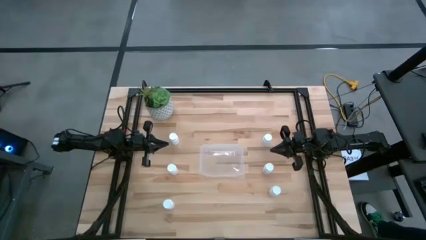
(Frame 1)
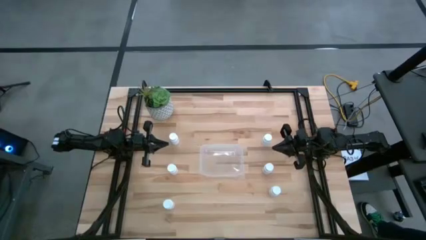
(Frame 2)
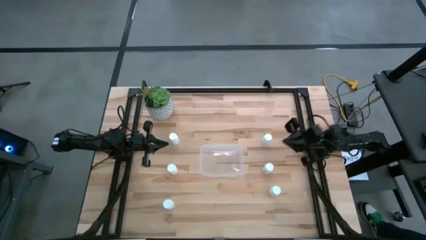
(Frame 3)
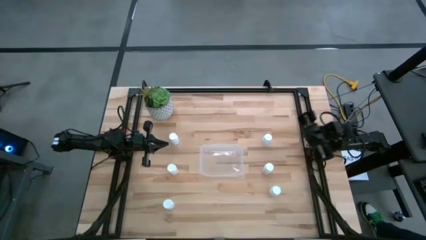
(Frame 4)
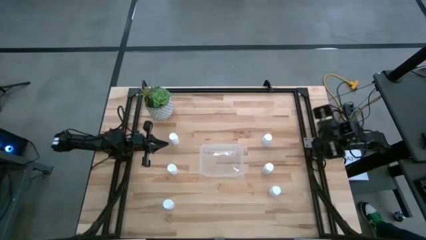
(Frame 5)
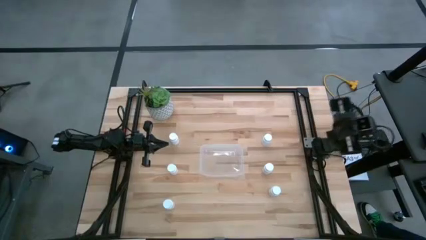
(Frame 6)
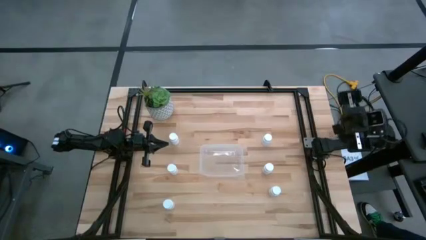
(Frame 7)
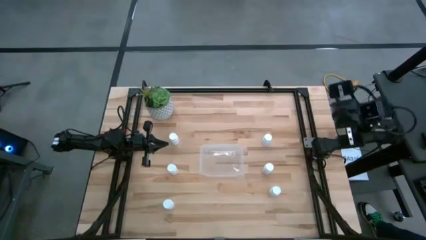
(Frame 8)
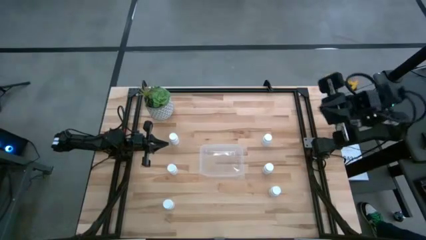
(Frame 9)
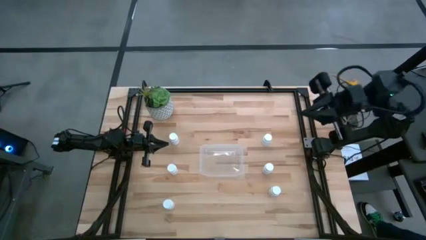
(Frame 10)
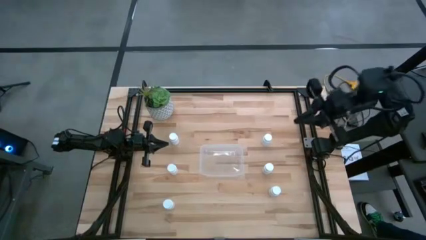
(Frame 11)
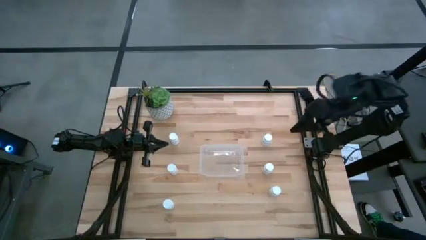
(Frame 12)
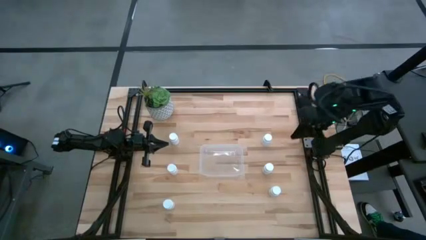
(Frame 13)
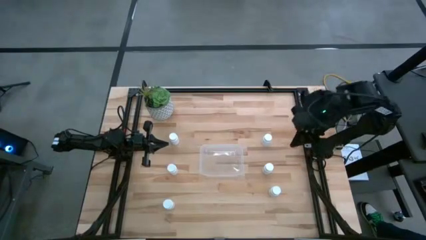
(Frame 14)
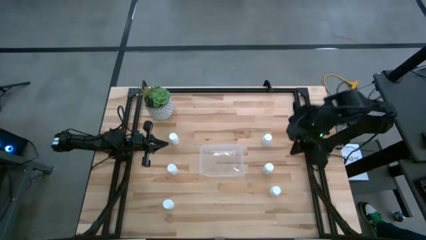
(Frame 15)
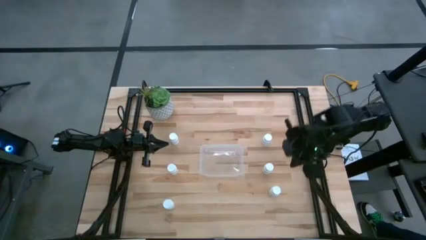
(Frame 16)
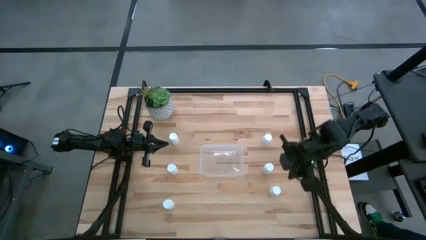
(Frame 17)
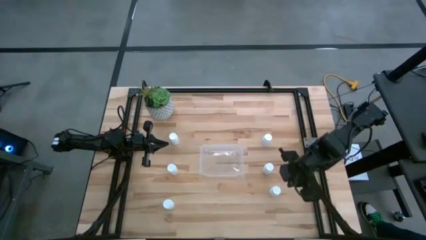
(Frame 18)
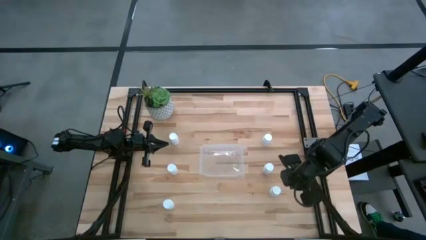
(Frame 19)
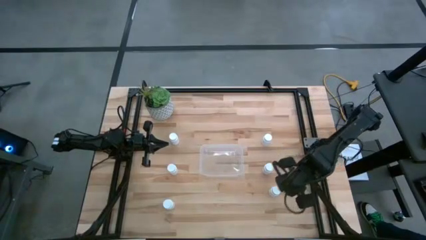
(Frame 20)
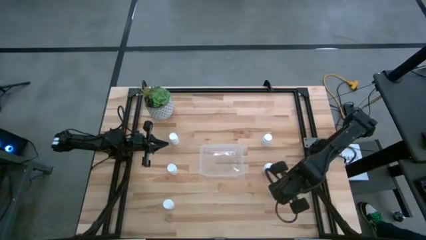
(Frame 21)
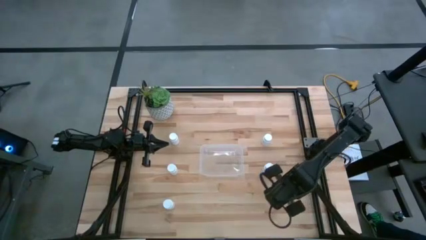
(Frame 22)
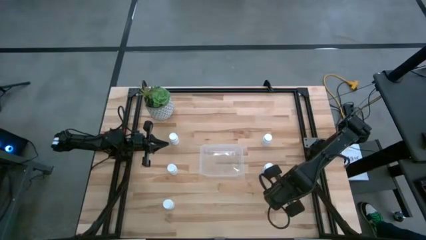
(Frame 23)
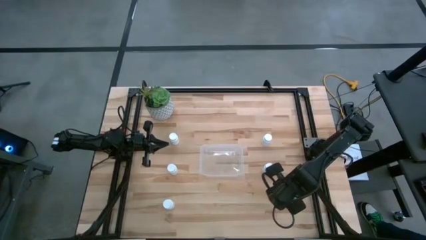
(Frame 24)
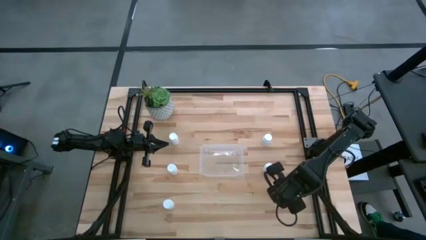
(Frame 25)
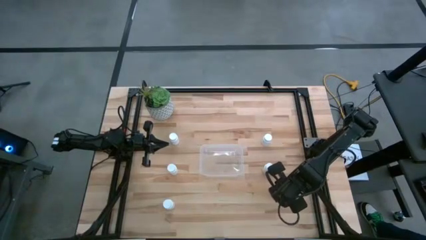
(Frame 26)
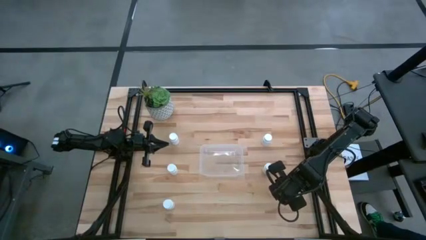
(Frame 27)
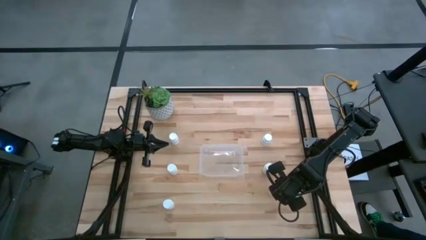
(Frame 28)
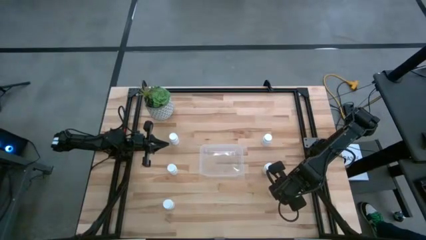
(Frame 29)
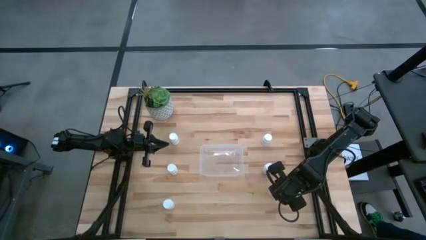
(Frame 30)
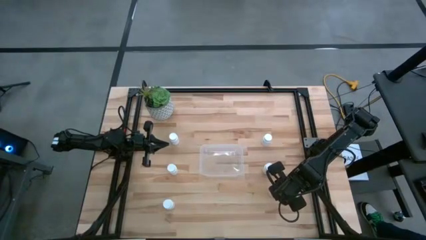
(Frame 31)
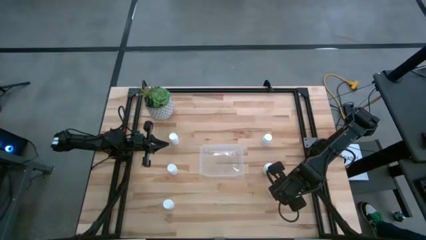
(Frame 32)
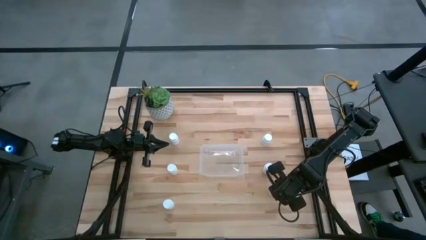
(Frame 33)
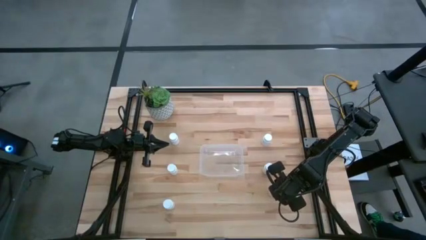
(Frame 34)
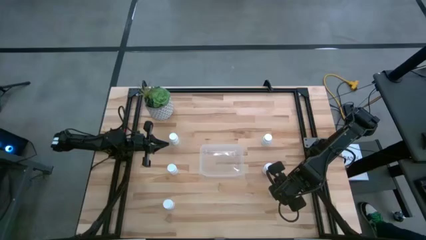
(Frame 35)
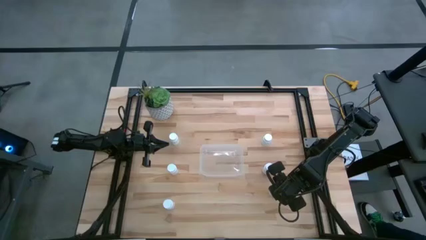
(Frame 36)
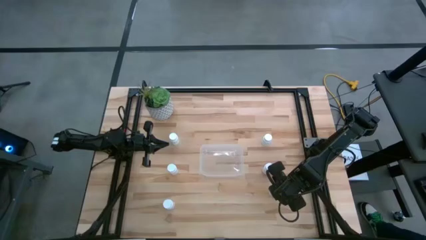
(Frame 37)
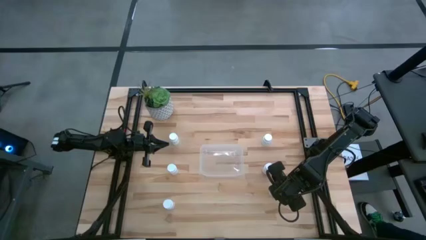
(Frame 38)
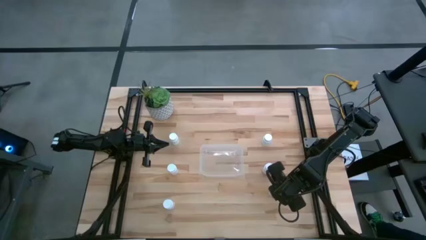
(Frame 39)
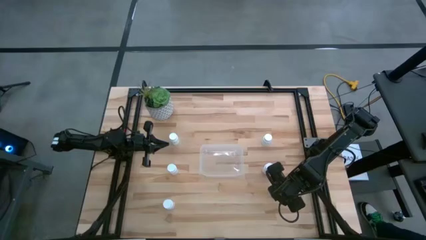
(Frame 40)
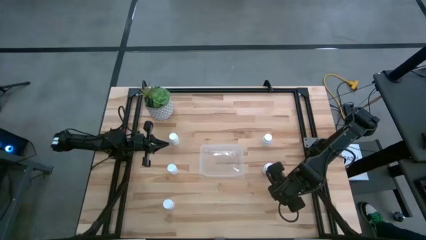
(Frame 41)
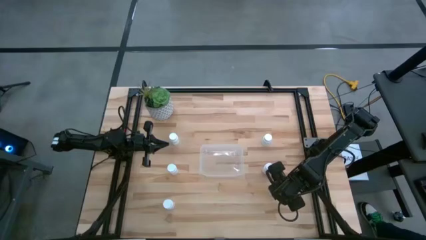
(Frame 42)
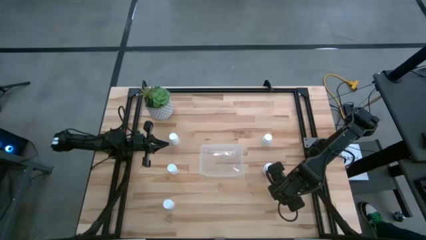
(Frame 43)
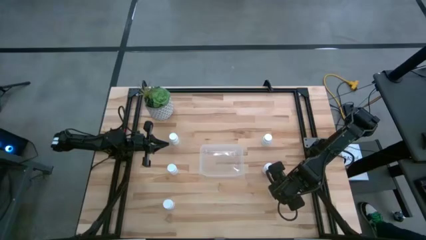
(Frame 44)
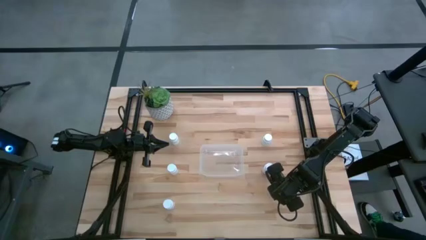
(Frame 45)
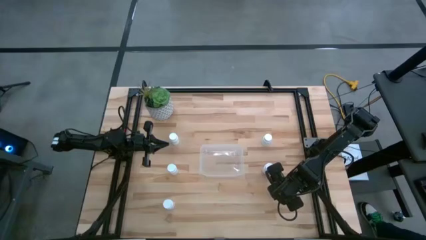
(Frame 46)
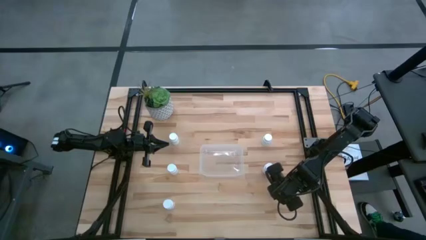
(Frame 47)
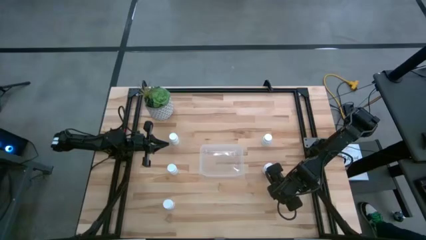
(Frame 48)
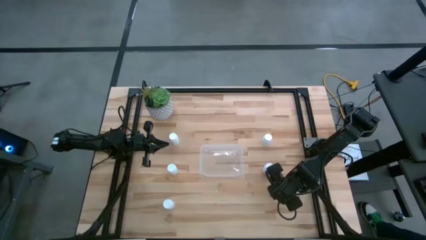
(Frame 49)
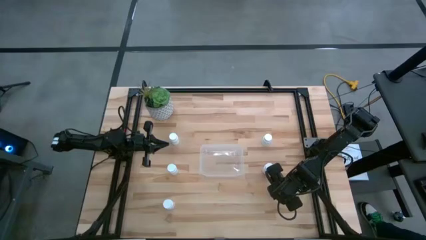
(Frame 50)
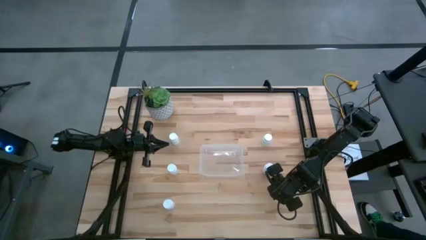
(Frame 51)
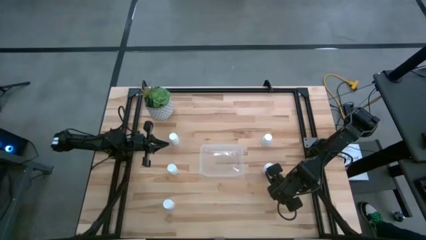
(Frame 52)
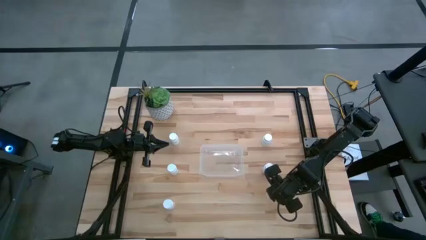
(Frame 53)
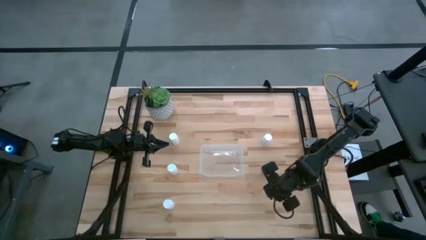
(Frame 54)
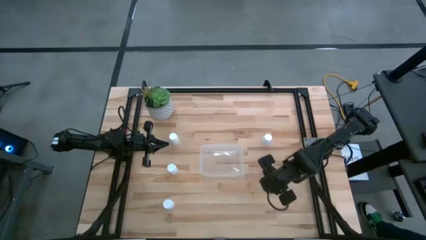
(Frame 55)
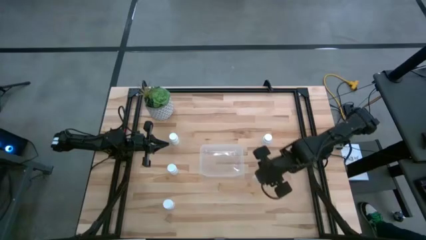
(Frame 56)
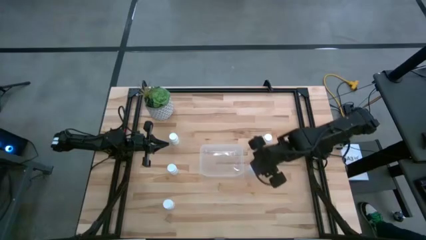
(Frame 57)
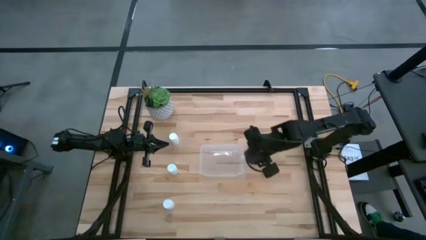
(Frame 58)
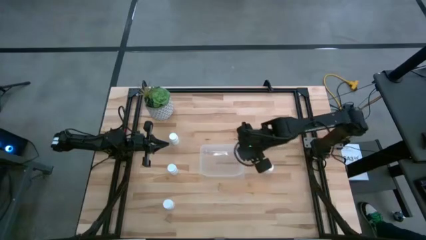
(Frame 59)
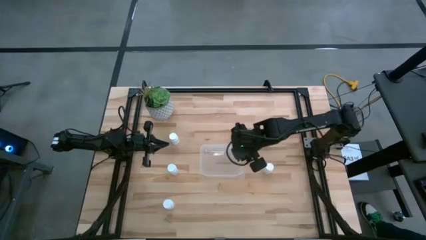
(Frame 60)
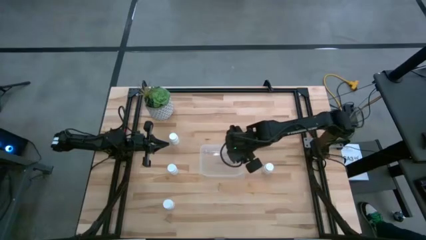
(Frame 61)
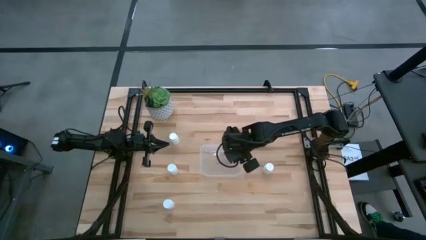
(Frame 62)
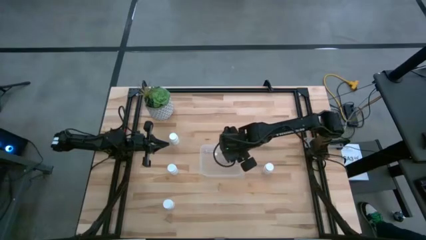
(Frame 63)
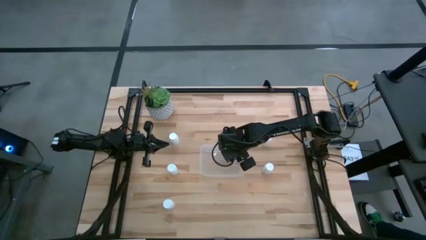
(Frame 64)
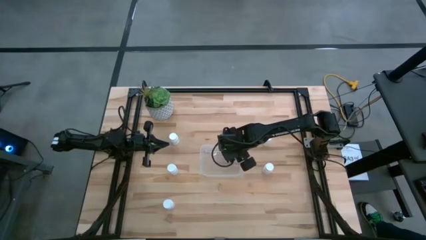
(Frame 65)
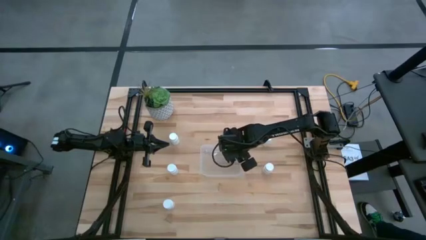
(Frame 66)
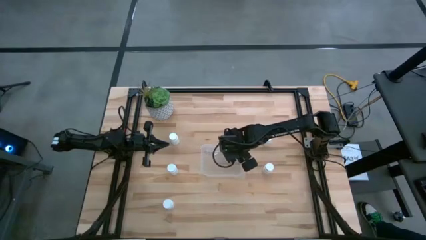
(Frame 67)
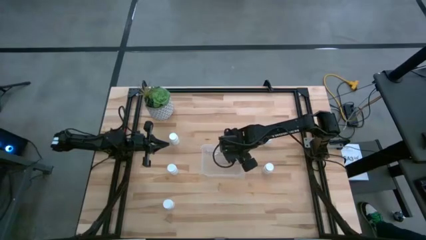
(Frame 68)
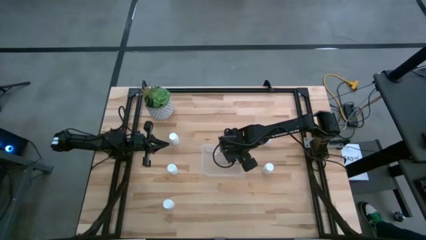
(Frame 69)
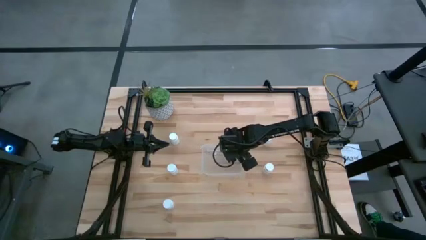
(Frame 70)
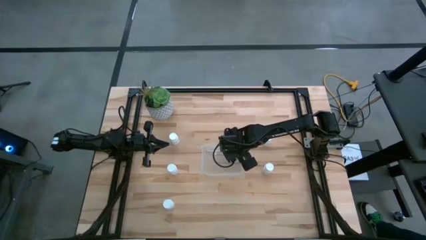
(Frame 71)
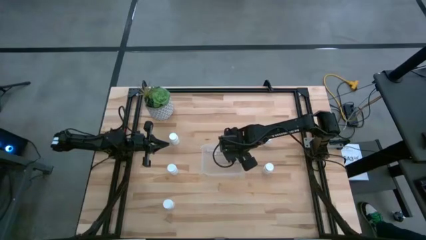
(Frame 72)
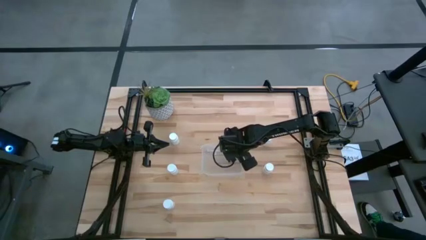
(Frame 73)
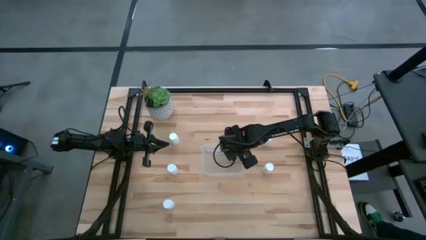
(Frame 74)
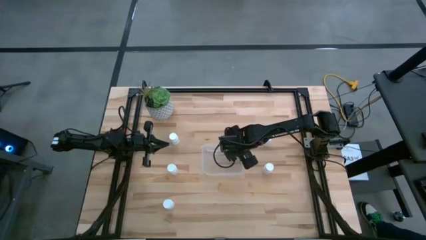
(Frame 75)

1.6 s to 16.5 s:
Task: Pick and place pill bottles into a basket
Put the white pill bottle into the transparent bin
